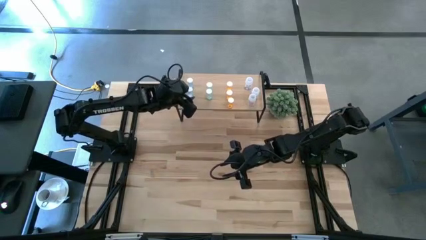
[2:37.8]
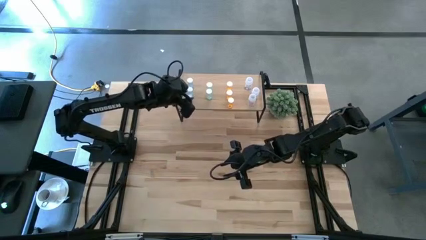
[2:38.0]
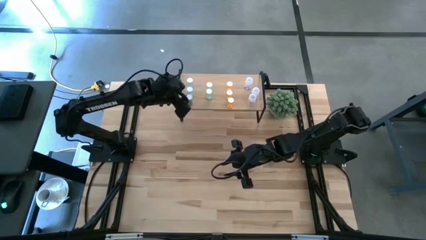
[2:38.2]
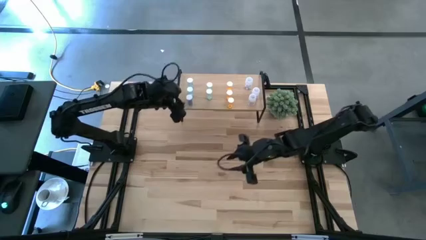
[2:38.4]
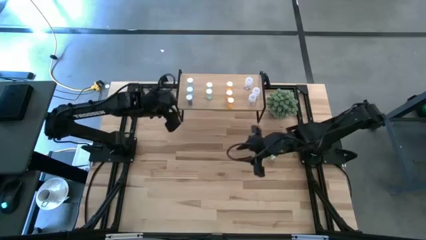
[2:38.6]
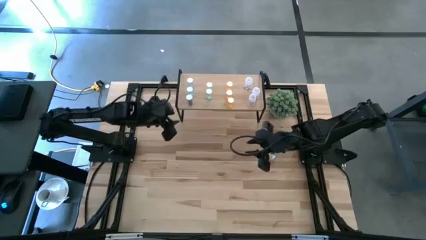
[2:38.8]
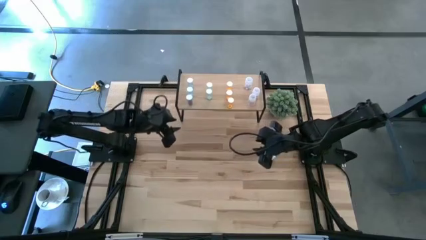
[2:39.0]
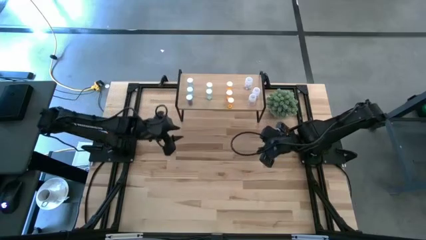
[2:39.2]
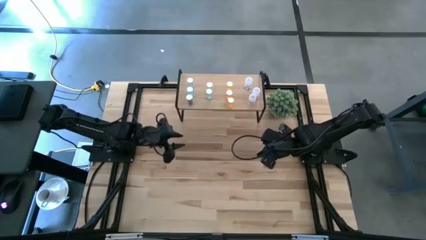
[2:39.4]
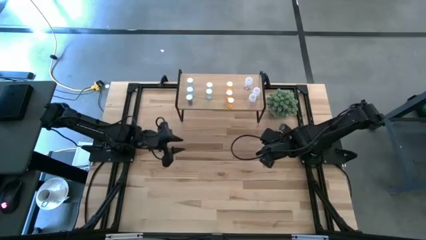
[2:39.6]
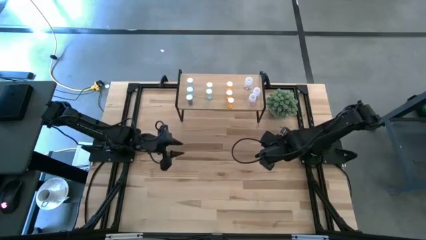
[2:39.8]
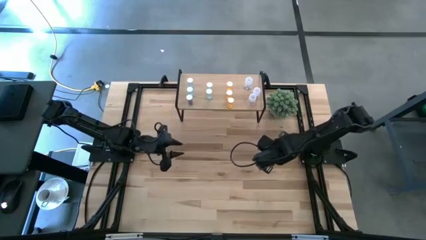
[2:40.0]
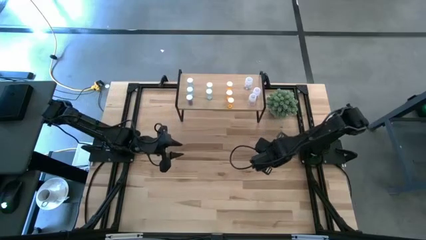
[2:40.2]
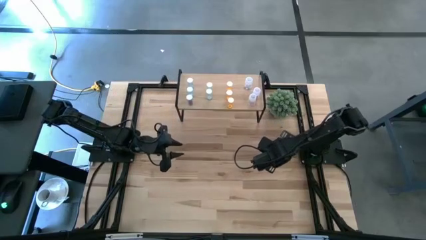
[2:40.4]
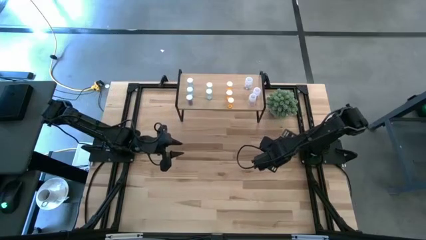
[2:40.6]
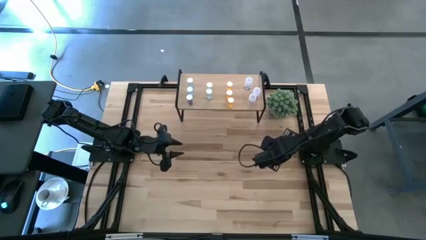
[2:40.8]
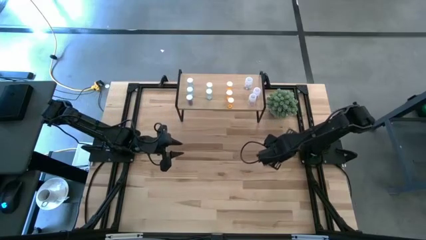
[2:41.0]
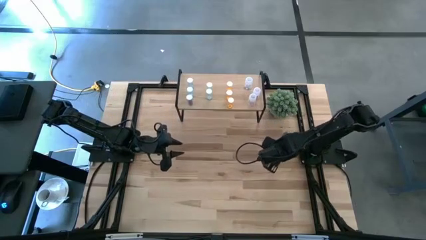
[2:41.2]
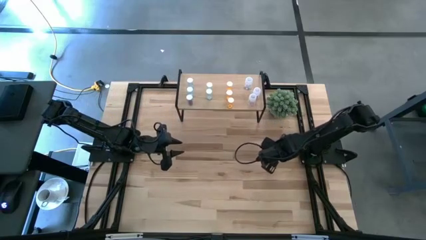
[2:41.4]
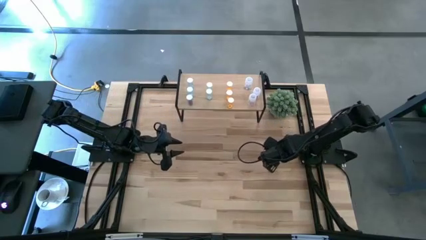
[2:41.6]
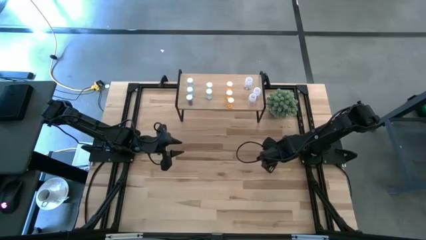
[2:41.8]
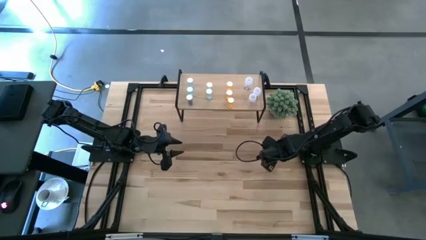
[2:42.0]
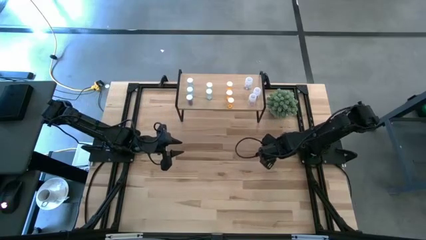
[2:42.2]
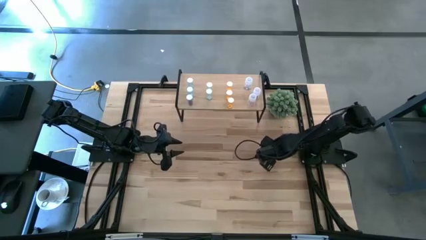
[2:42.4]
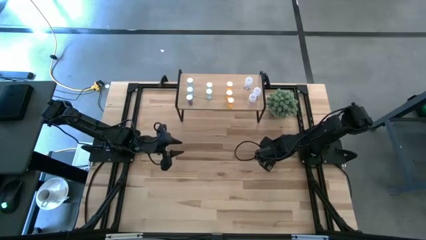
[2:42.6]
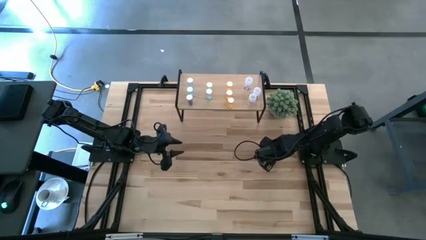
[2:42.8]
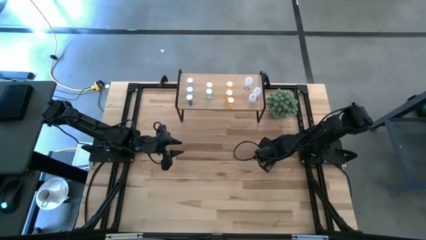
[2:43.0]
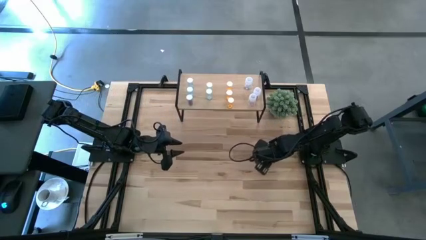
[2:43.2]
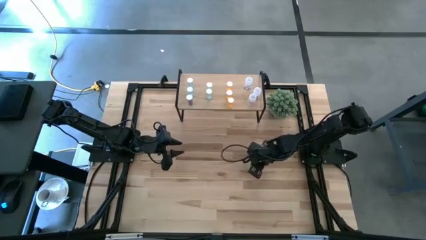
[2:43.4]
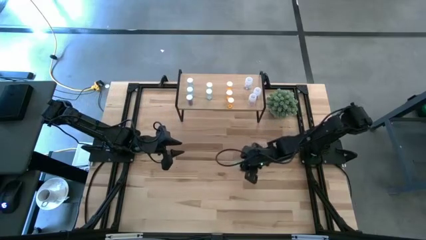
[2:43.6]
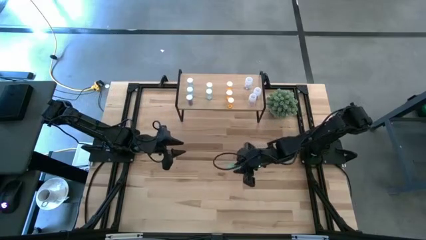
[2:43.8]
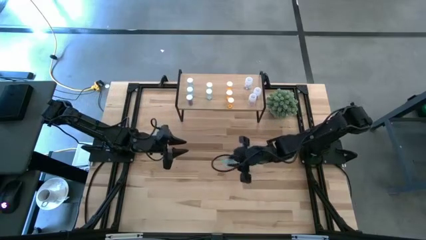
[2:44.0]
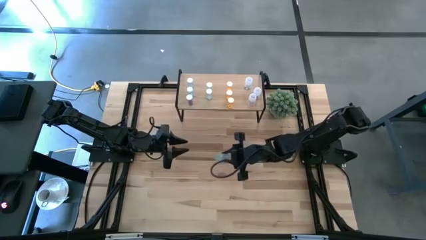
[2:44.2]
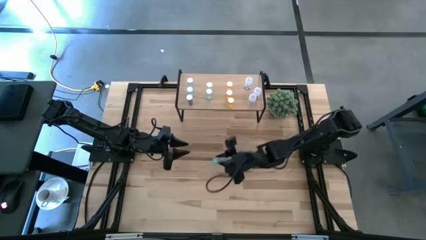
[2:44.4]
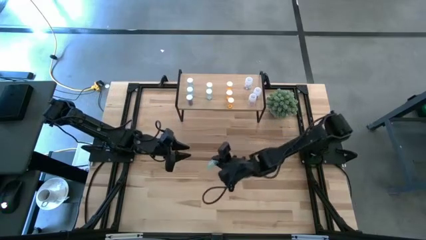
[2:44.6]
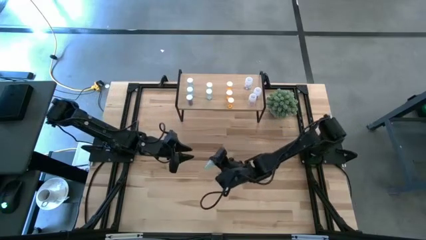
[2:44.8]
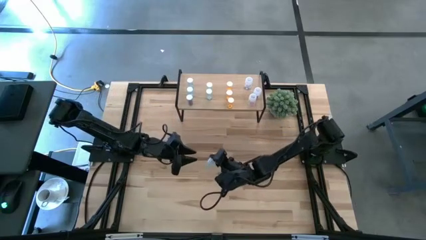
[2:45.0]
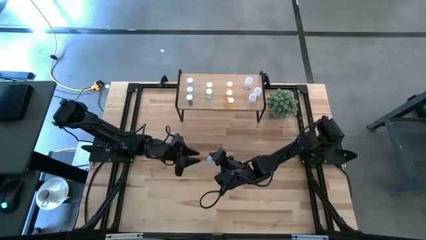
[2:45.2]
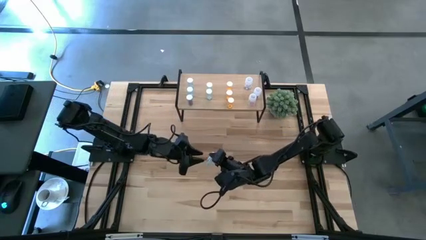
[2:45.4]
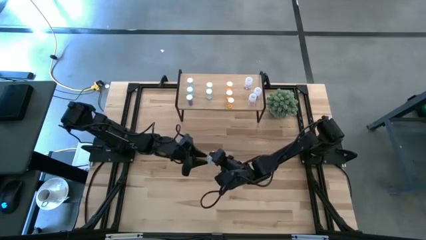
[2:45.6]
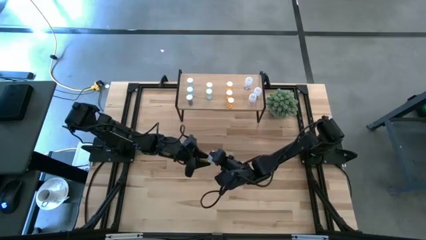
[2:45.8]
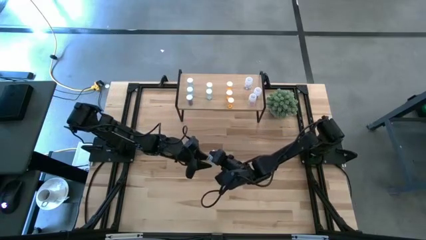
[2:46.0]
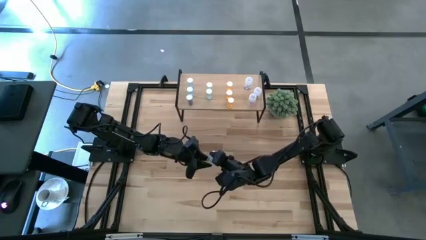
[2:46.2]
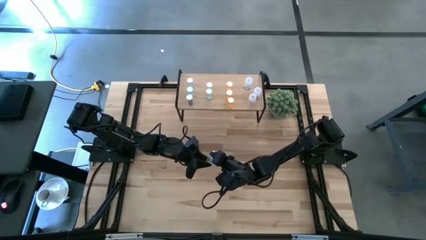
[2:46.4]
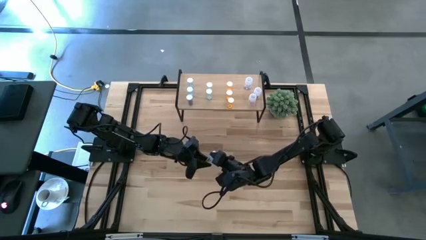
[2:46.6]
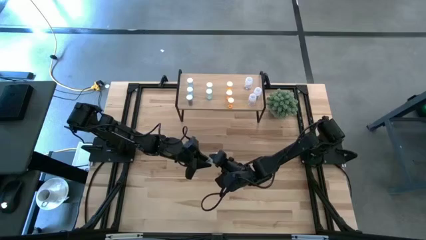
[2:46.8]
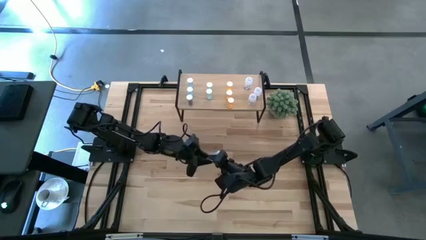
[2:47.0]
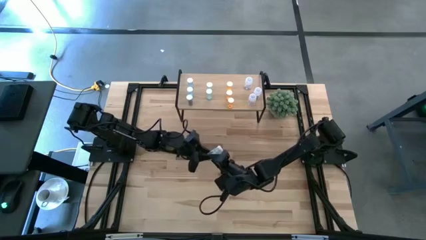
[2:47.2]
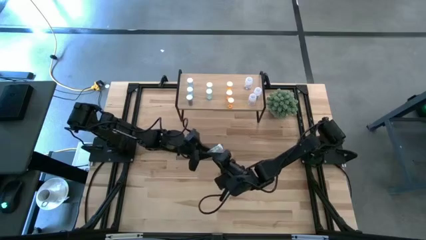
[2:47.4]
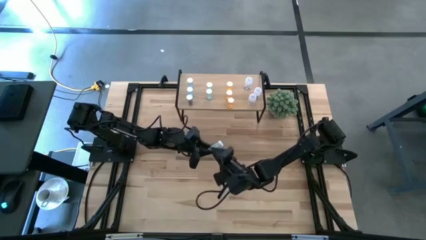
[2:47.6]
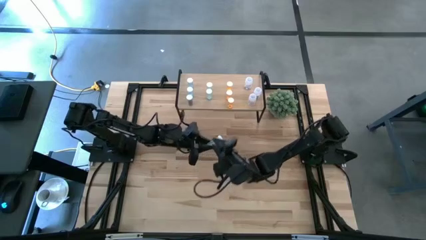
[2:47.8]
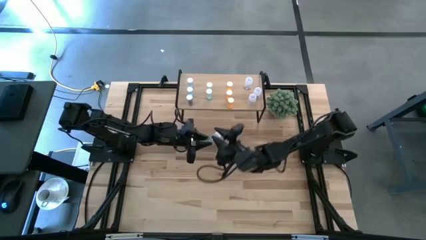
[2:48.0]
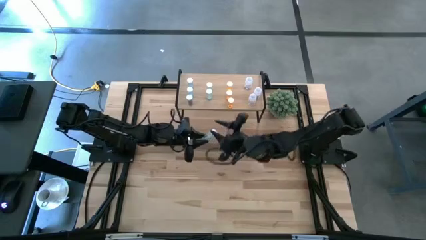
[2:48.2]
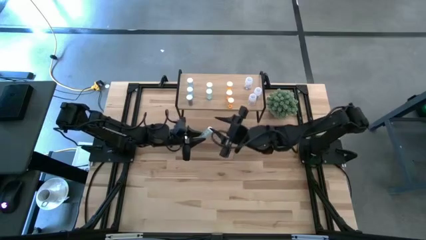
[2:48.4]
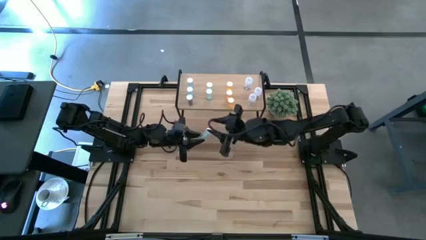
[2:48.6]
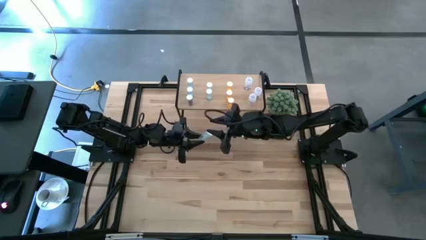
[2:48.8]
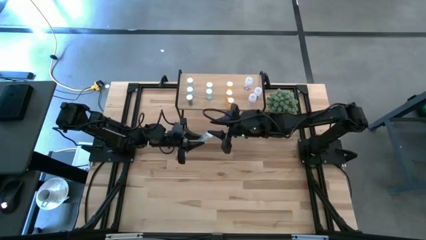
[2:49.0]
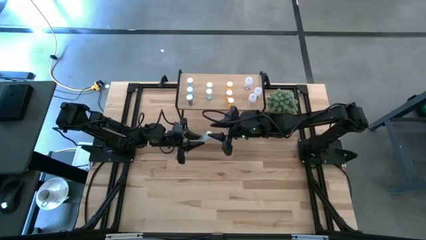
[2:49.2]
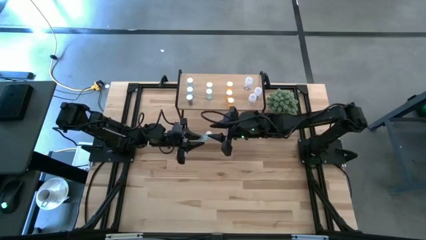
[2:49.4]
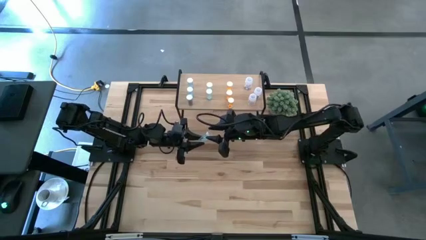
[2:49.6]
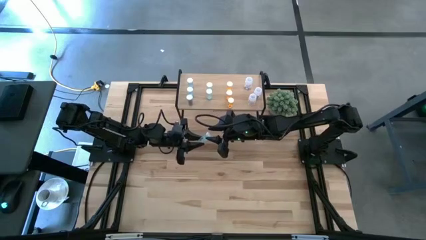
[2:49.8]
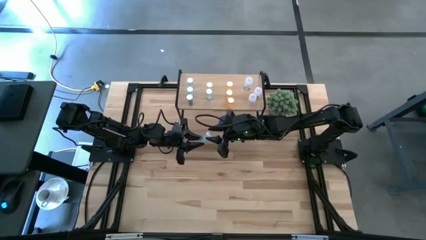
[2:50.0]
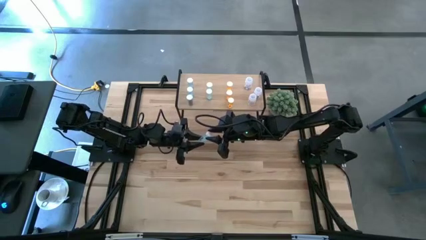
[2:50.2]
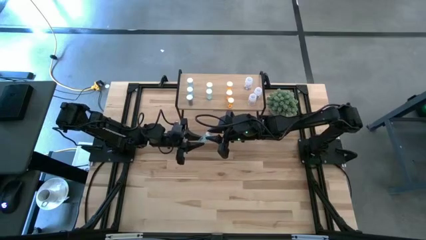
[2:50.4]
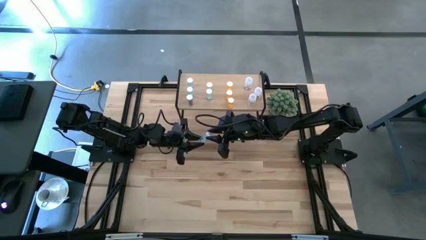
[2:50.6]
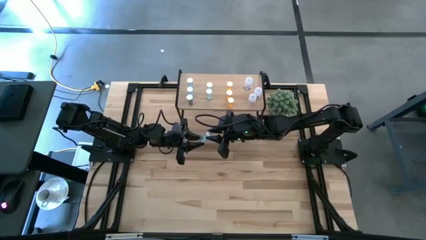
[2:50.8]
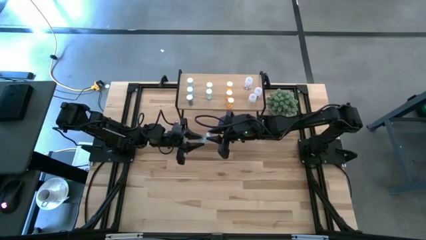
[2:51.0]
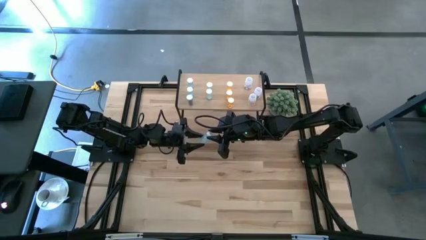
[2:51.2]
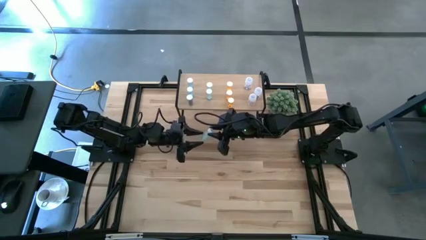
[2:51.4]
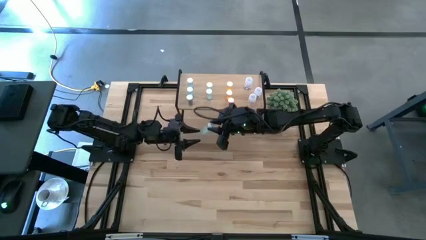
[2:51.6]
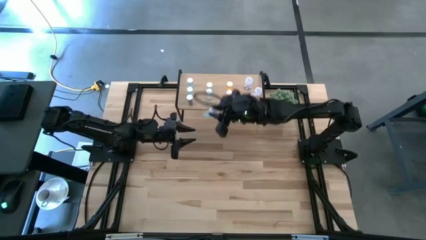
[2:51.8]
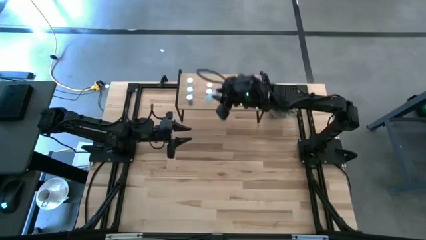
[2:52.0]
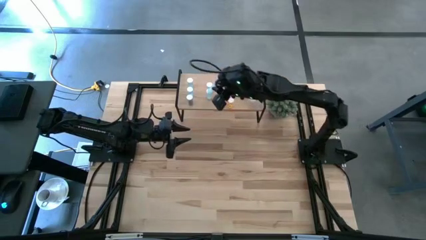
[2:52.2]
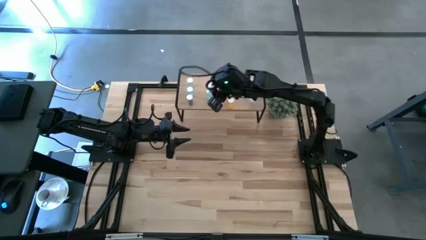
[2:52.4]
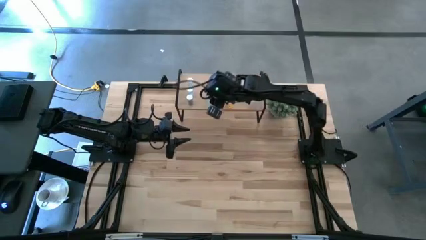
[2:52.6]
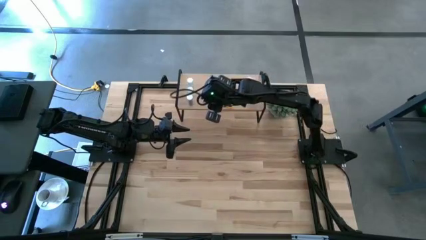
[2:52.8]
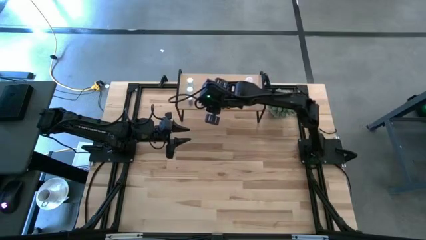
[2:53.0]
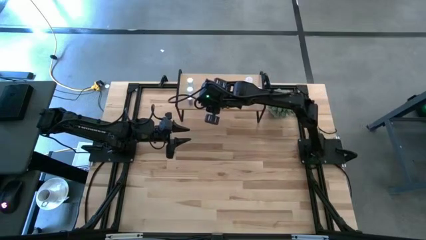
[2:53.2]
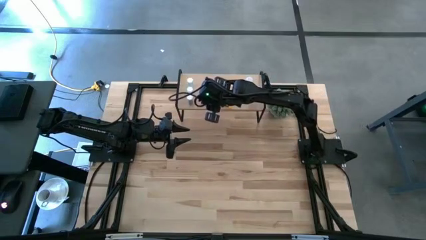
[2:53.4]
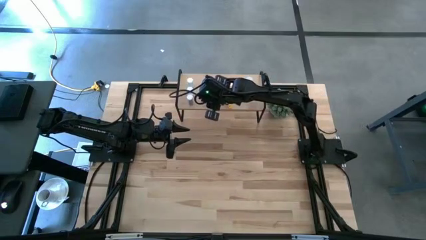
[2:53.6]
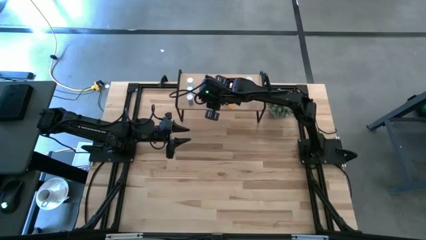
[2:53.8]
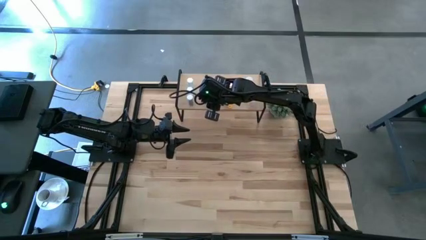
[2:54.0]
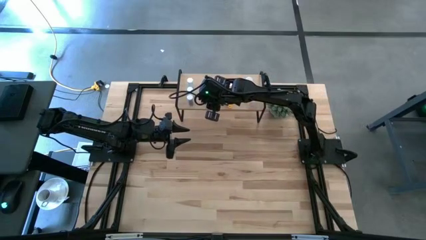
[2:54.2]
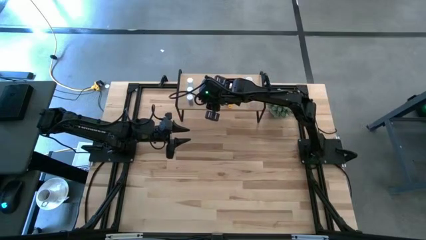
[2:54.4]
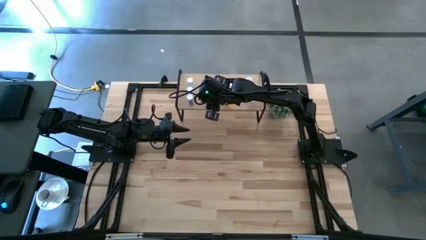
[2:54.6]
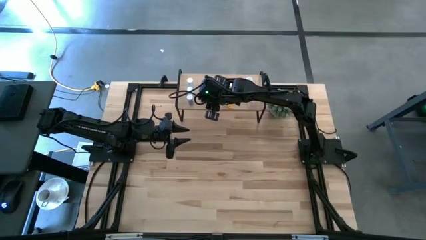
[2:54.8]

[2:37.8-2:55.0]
Task: Pick and place medicine bottles onto shelf by color
Put the light blue pill bottle on the shelf aligned with the other light blue pill bottles
